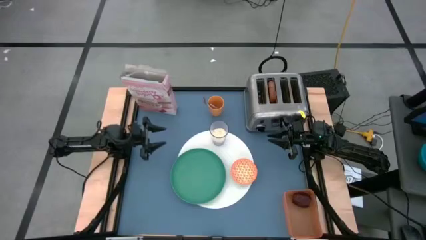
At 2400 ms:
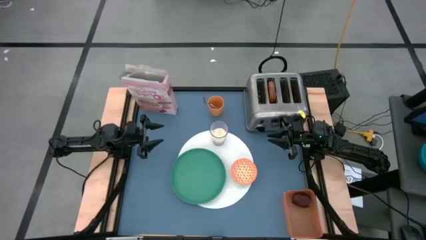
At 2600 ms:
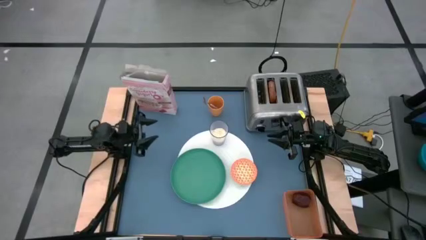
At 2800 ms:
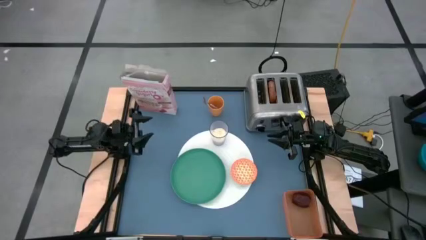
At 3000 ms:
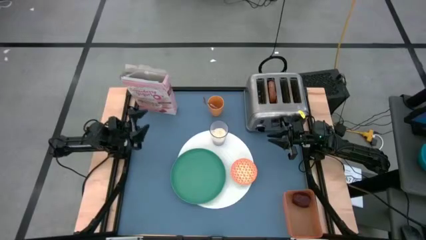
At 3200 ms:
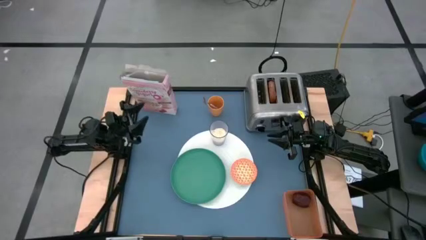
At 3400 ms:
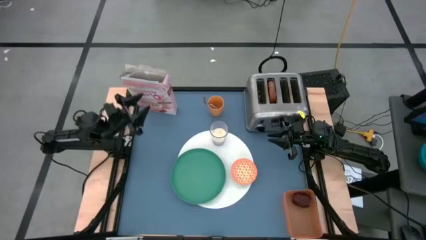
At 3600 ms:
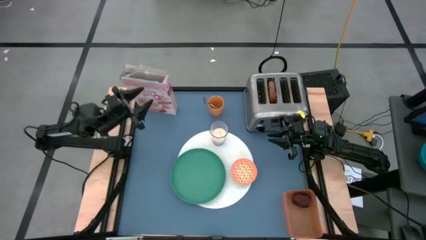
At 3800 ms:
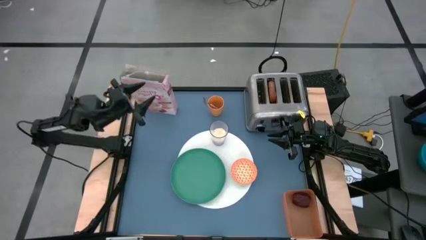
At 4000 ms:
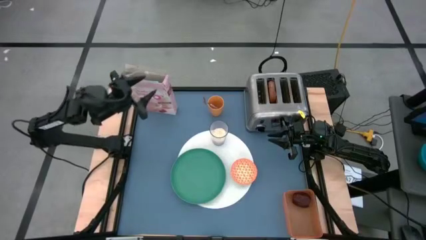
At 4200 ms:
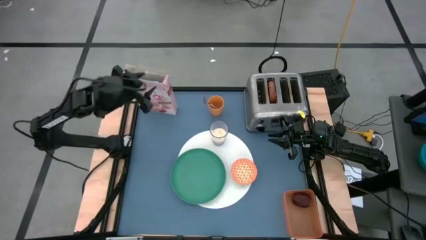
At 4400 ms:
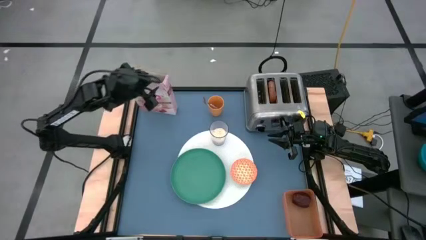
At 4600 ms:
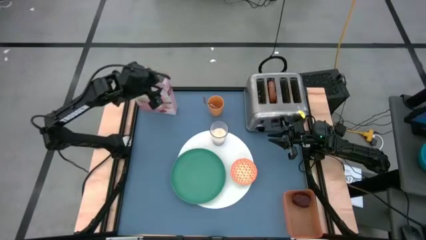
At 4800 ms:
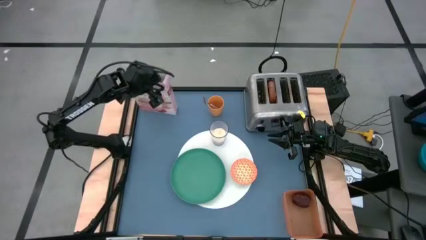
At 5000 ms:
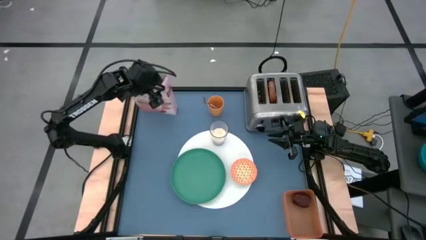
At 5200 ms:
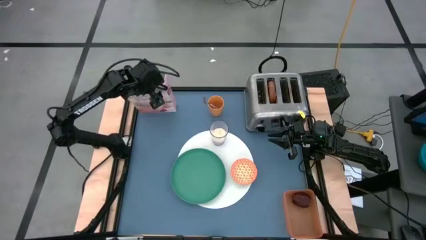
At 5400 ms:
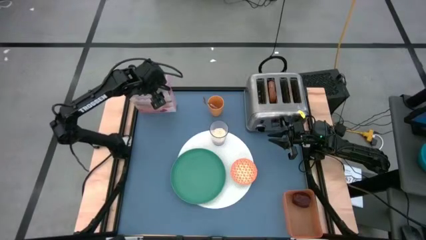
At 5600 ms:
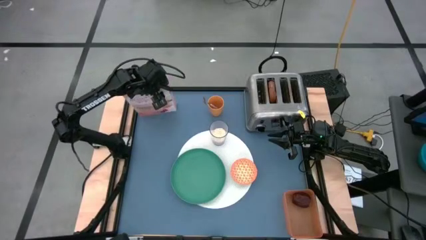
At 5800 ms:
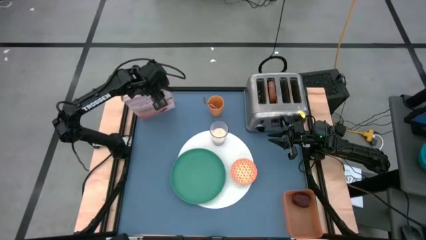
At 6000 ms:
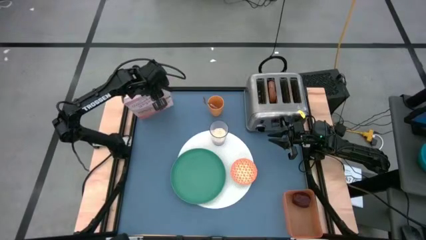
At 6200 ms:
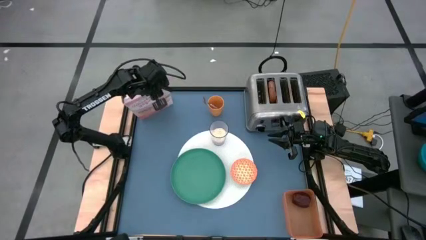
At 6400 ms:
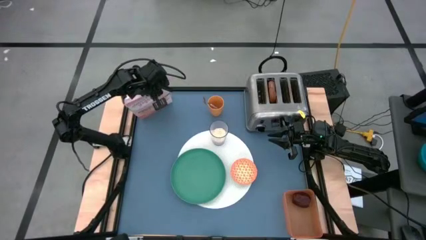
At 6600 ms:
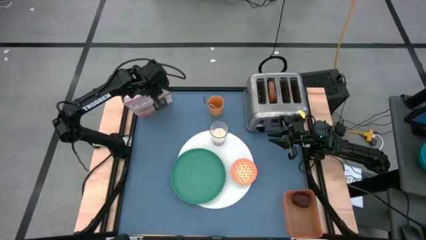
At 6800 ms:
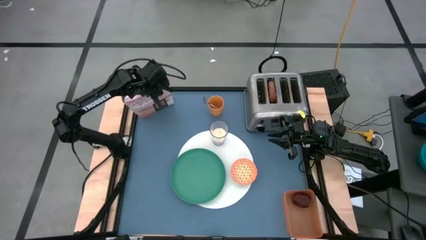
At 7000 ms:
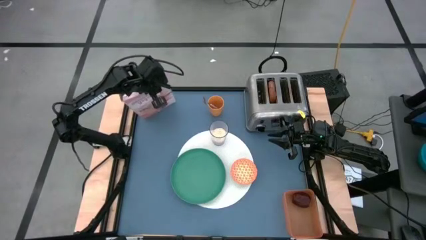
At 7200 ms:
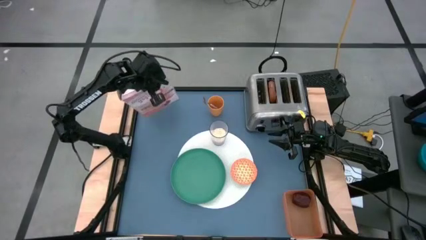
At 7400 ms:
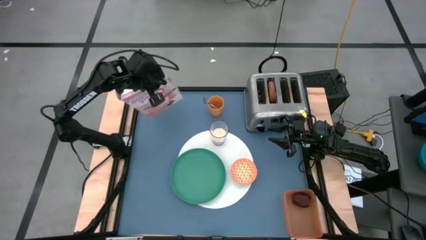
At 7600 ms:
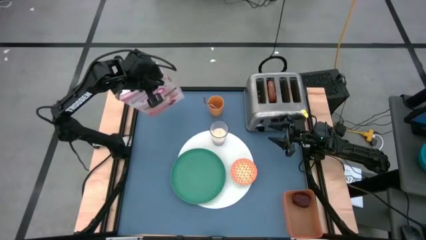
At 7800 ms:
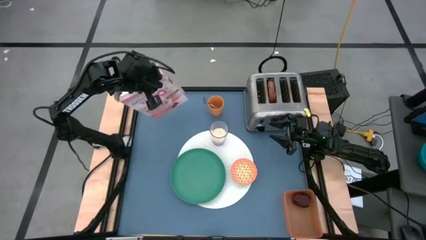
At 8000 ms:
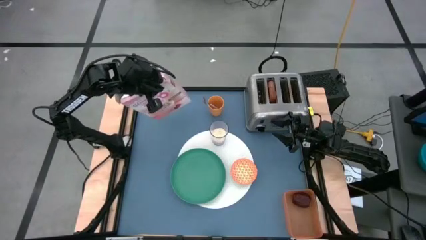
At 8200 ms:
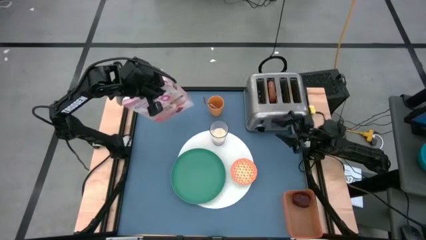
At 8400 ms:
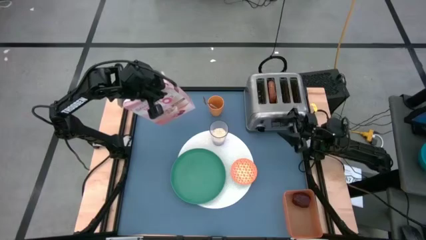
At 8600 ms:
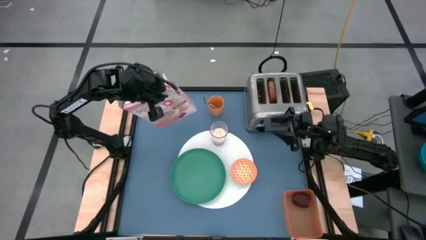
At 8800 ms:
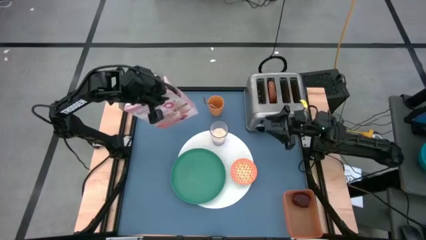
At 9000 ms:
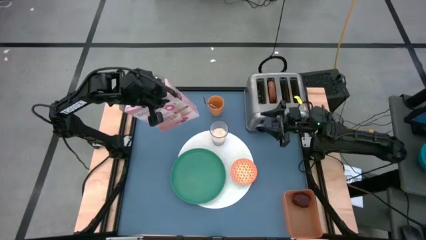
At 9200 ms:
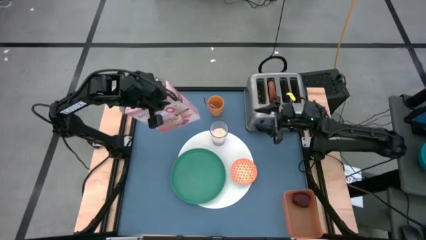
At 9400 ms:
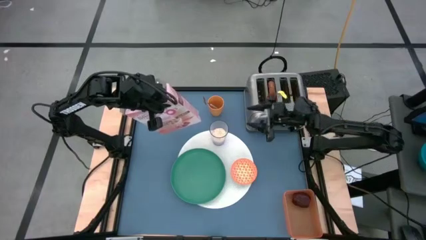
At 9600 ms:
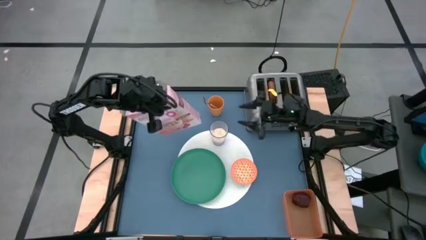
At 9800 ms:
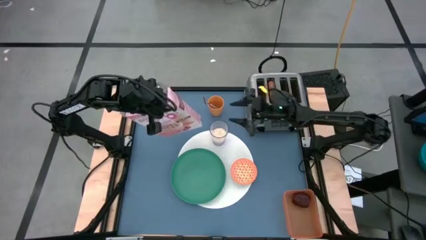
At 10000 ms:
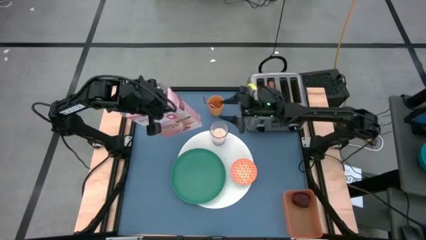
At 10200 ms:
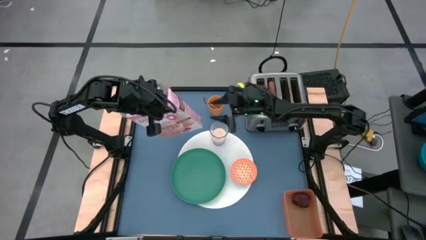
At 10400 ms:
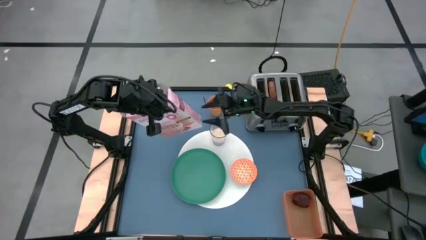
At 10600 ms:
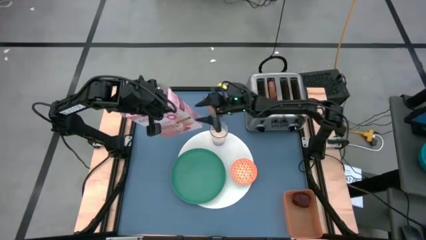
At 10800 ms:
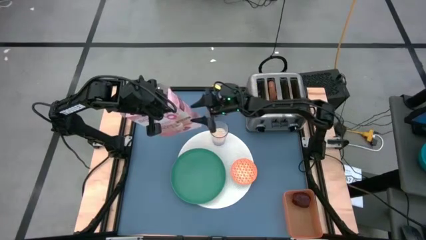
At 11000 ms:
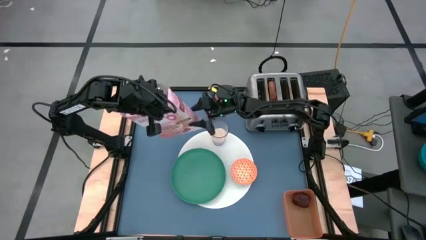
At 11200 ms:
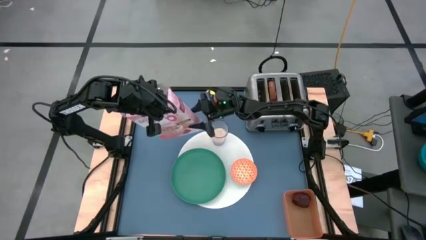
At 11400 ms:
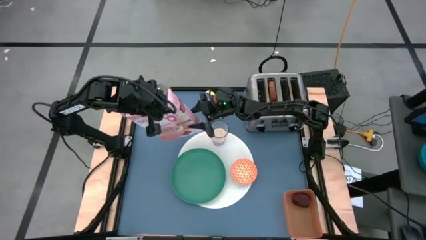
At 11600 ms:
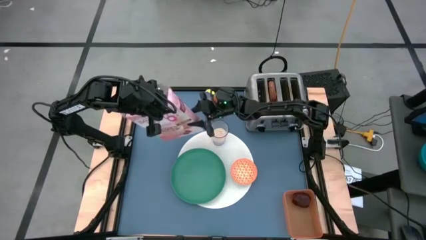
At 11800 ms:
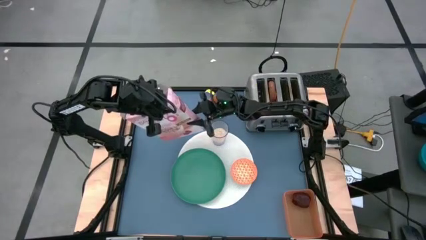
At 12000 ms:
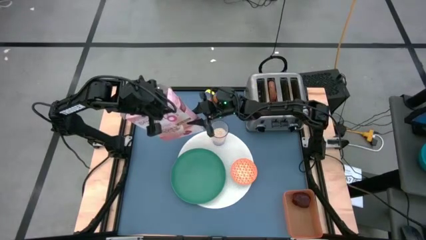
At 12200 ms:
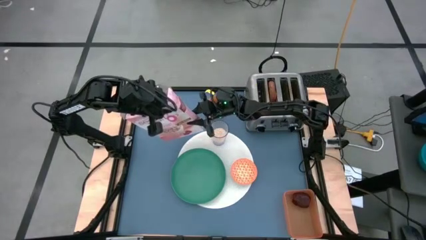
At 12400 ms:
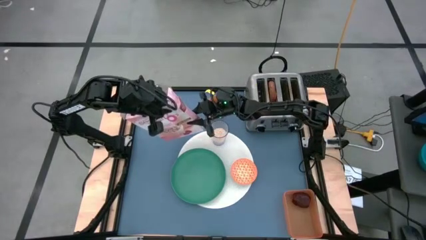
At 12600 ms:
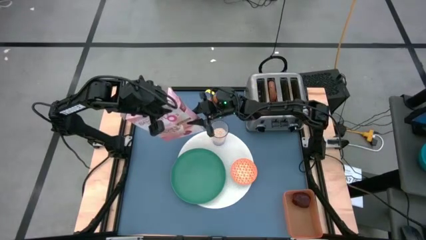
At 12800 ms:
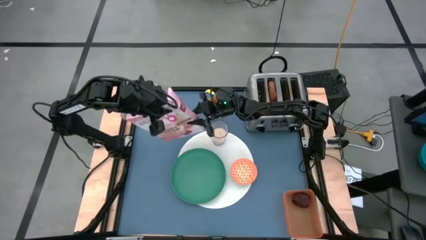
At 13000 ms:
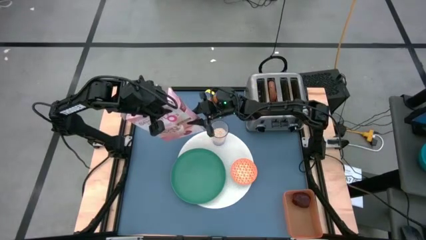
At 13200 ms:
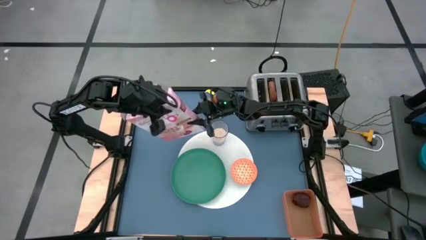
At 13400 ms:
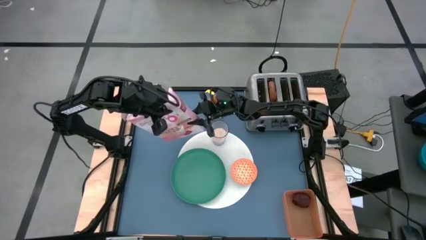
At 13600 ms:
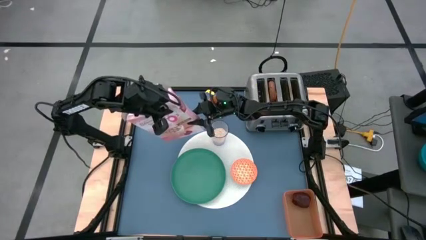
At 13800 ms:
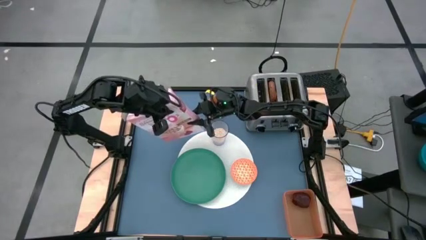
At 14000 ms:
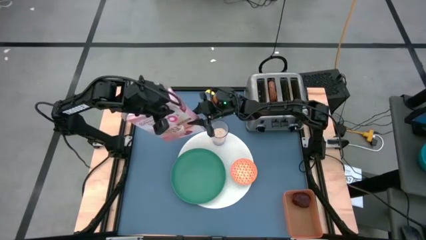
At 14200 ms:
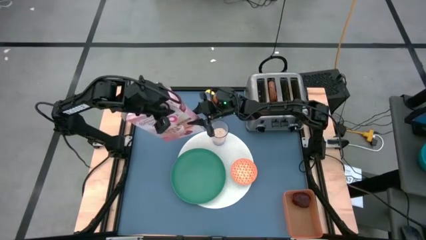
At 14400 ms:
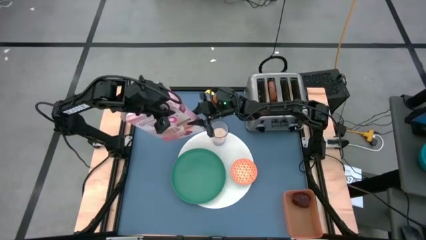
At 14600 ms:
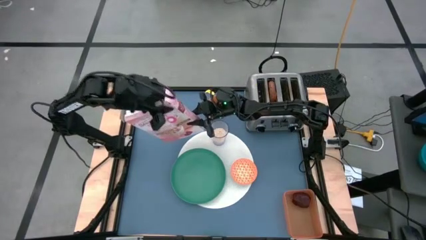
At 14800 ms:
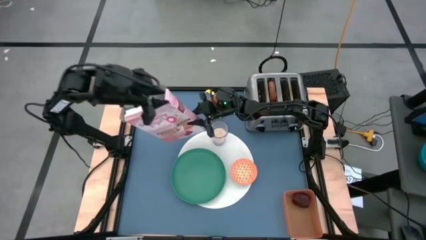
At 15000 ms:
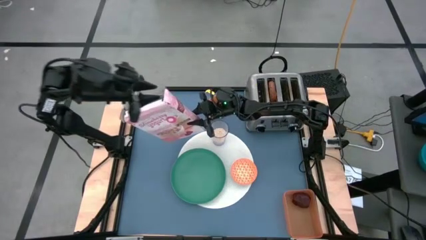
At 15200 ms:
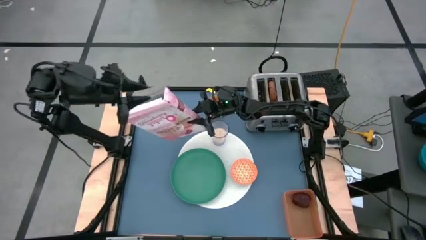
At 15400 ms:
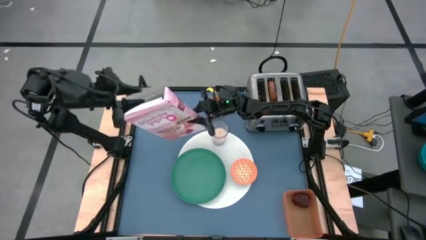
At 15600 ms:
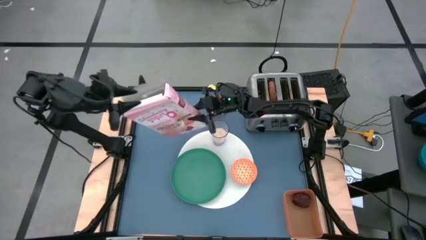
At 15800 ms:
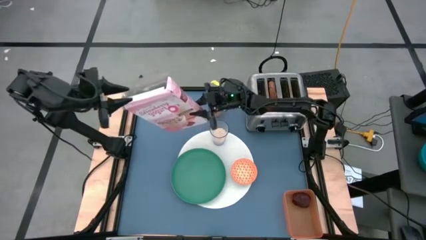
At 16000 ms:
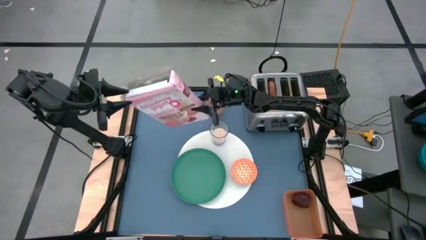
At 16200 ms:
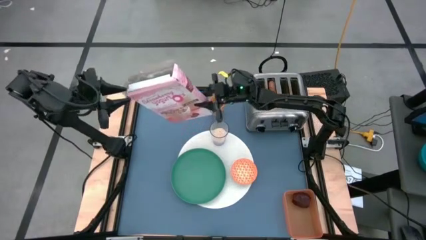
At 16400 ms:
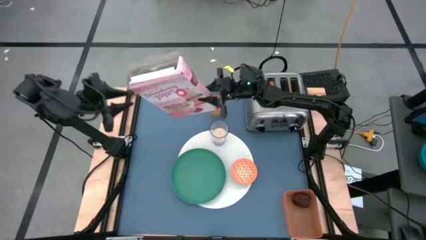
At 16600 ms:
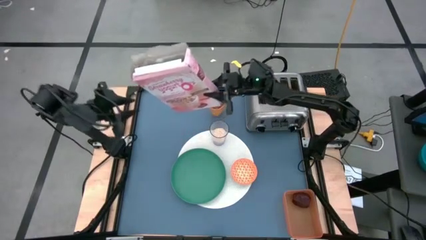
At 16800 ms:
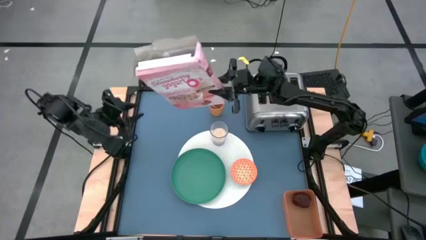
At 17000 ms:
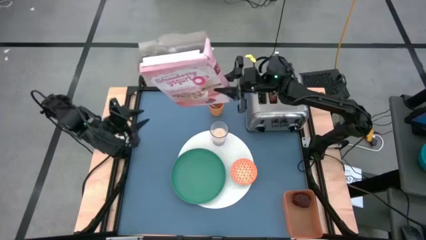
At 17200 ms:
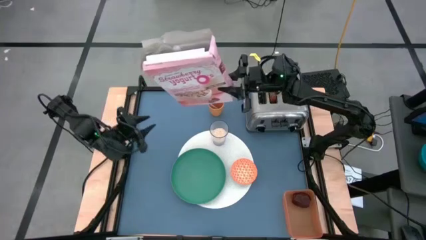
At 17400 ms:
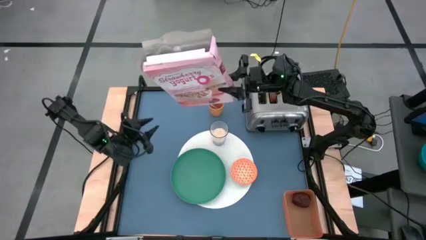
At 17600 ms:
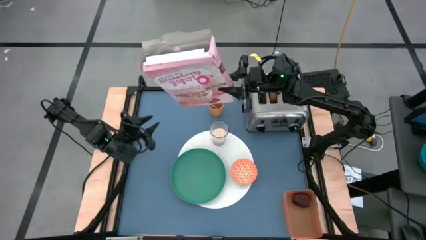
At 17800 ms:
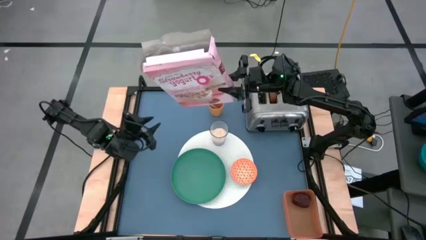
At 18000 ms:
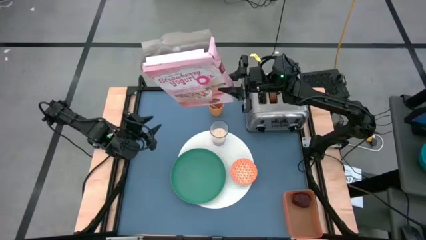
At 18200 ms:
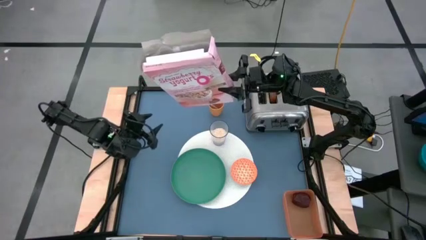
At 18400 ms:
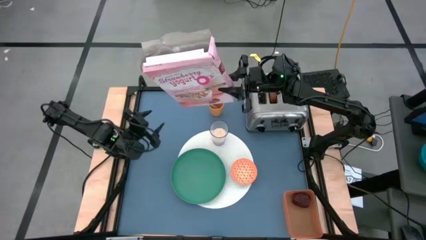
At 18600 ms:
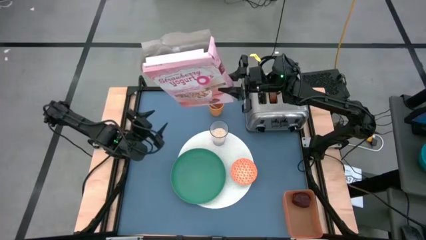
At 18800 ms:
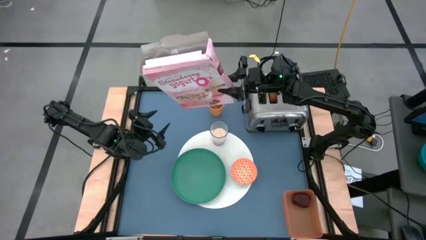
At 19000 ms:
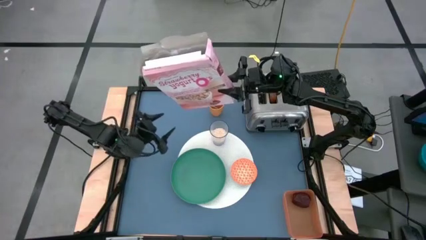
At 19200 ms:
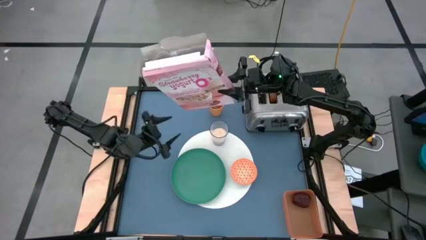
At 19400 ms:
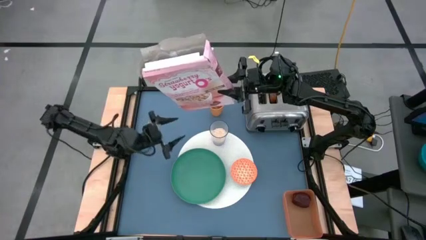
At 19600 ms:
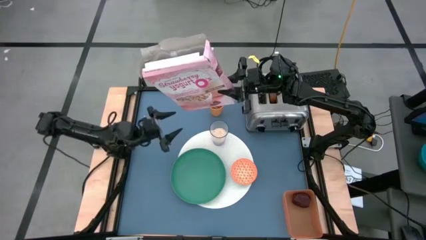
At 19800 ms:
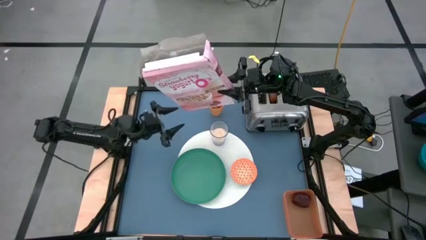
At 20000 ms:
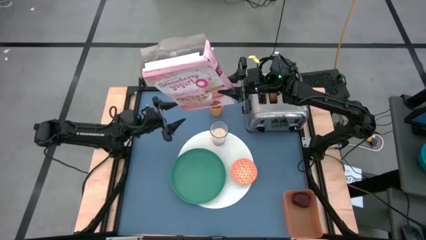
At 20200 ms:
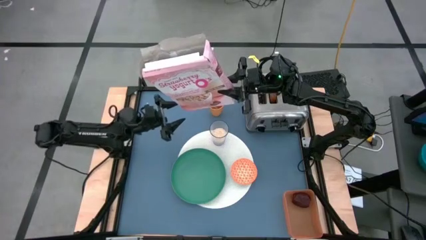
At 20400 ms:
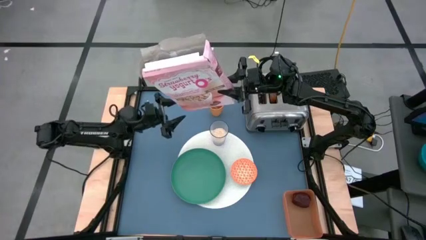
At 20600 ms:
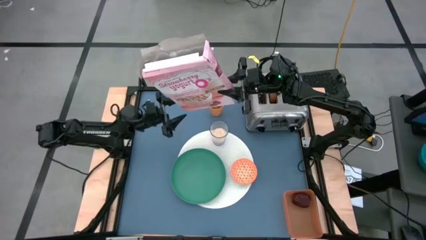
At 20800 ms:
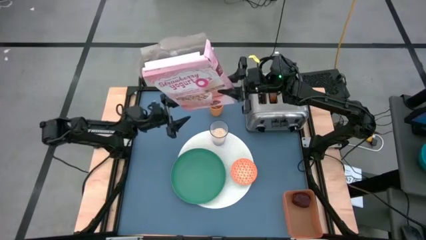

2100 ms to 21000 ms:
Task: Arrange a breakfast setting
Pour the cereal from the cereal box into the orange bowl
